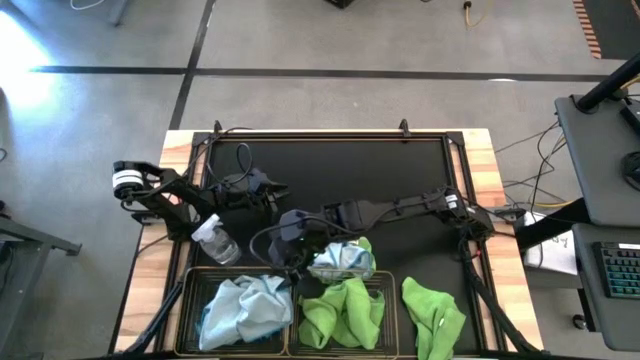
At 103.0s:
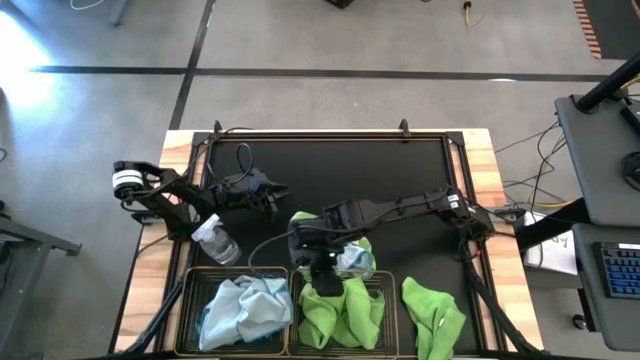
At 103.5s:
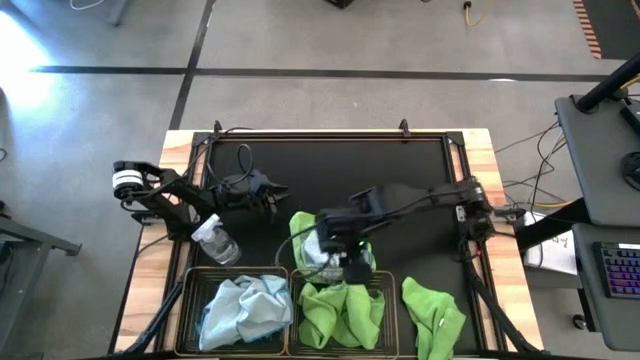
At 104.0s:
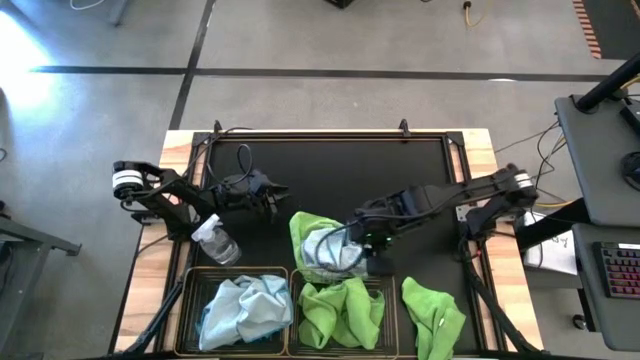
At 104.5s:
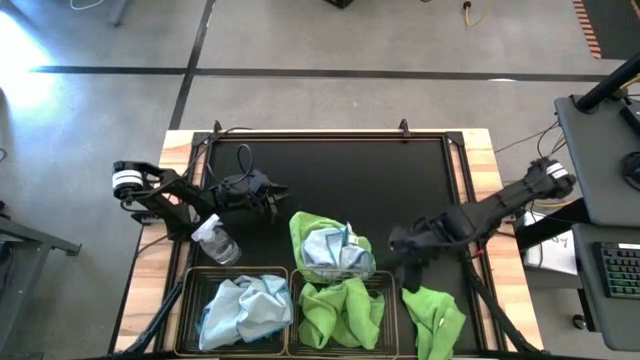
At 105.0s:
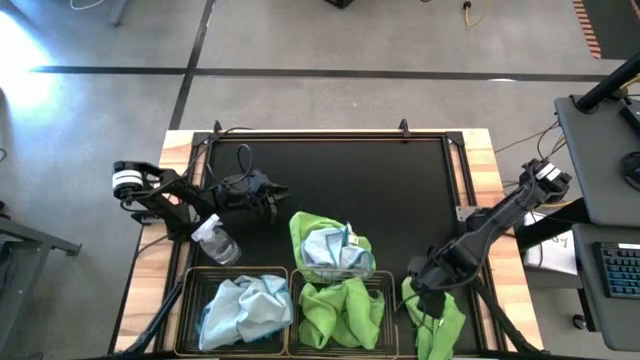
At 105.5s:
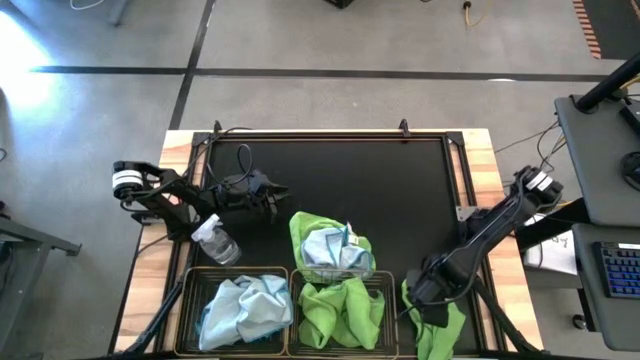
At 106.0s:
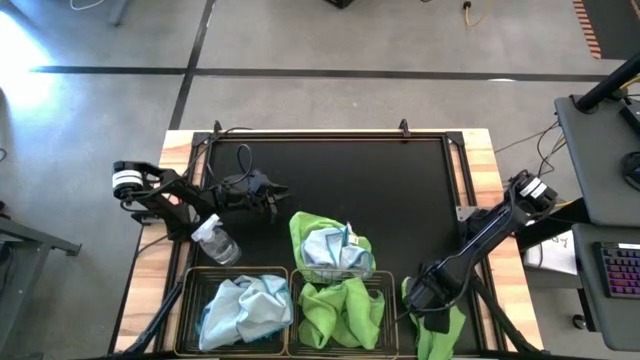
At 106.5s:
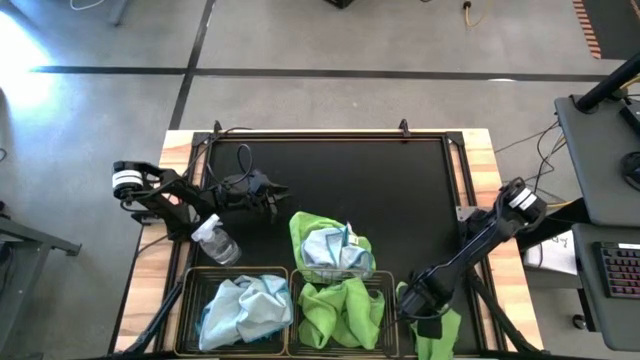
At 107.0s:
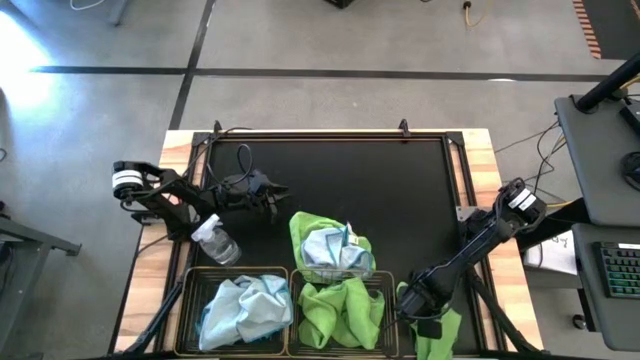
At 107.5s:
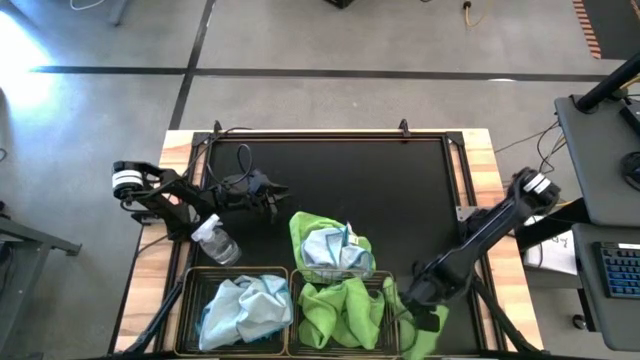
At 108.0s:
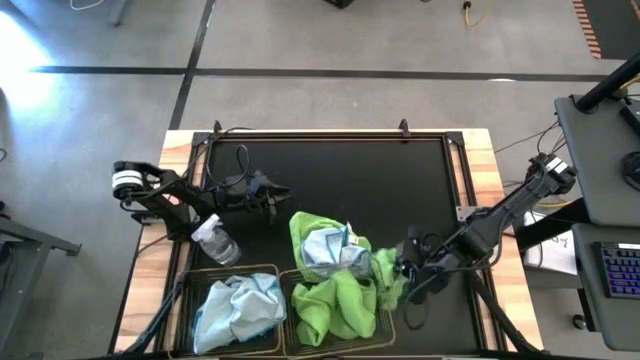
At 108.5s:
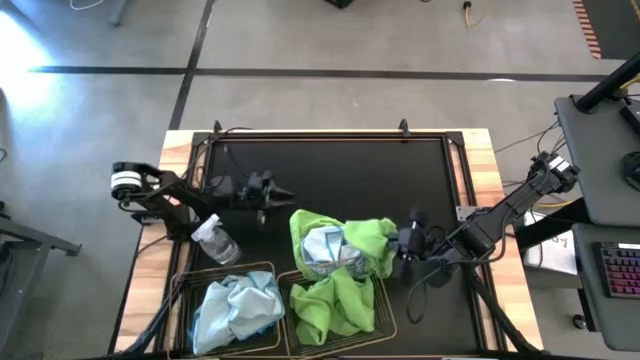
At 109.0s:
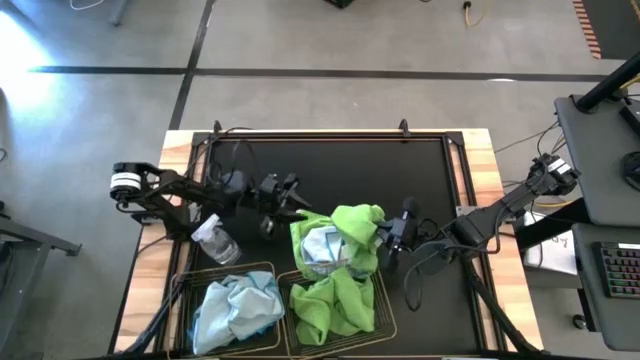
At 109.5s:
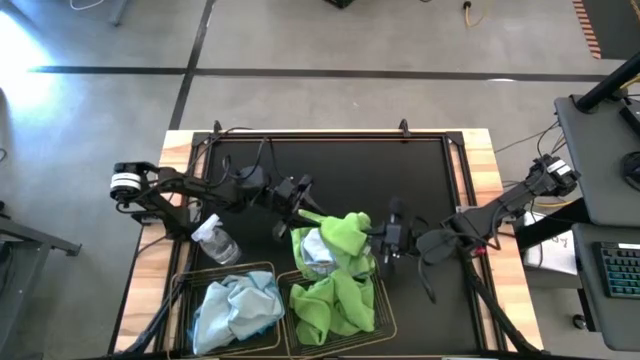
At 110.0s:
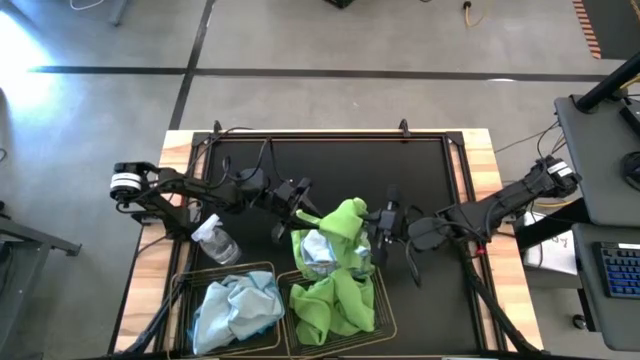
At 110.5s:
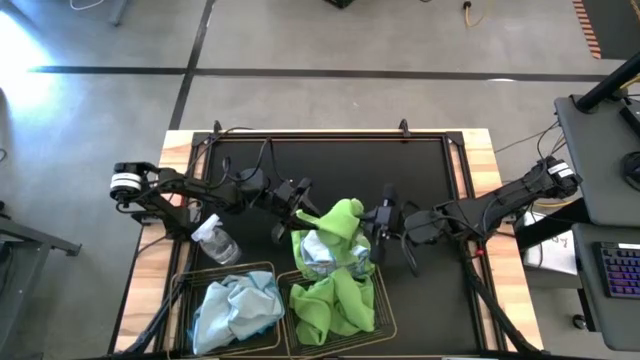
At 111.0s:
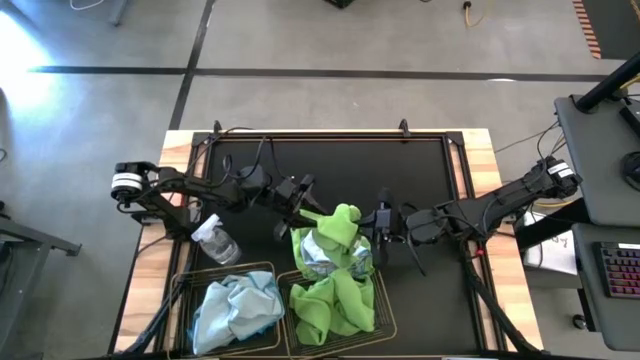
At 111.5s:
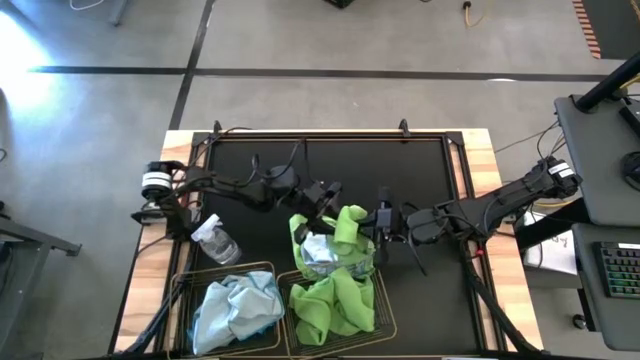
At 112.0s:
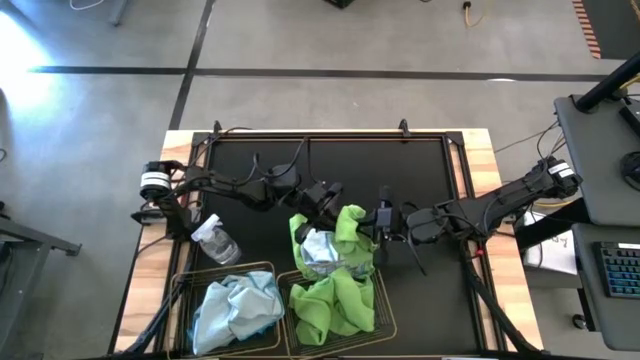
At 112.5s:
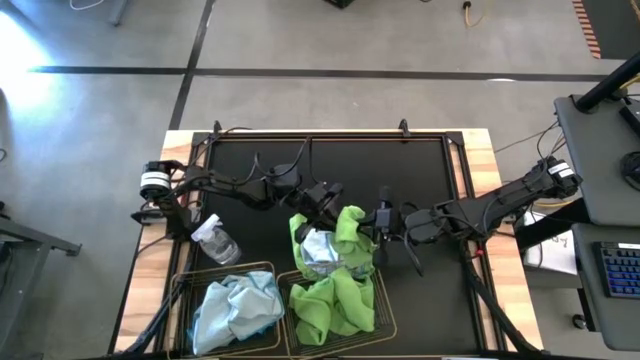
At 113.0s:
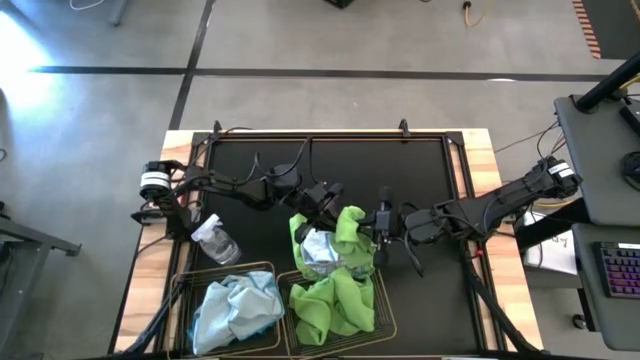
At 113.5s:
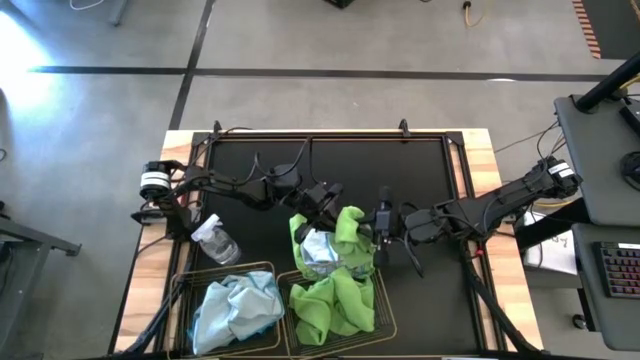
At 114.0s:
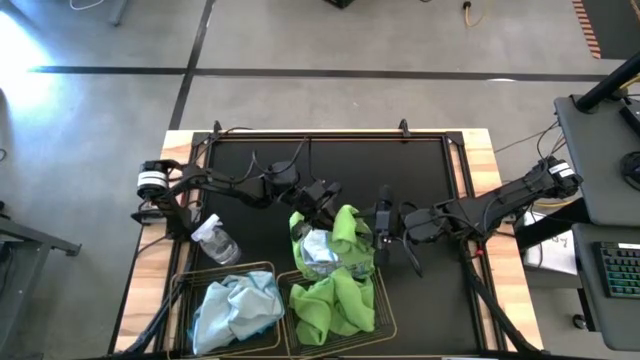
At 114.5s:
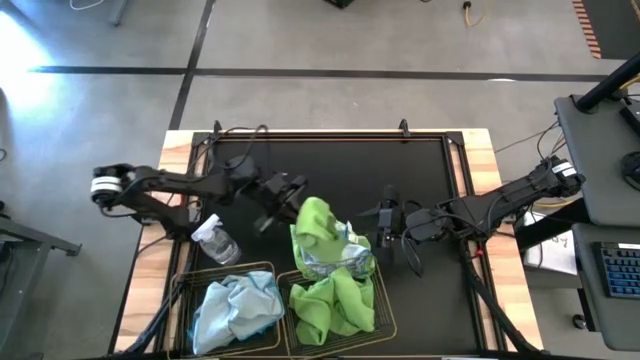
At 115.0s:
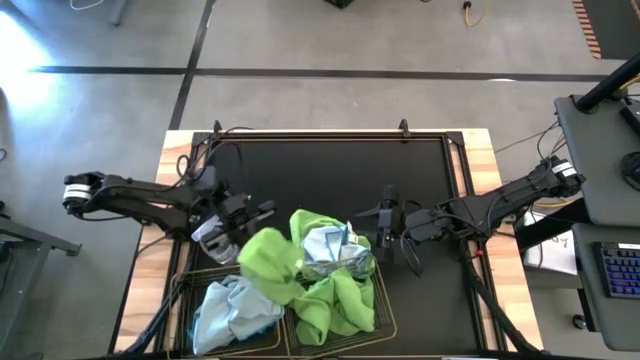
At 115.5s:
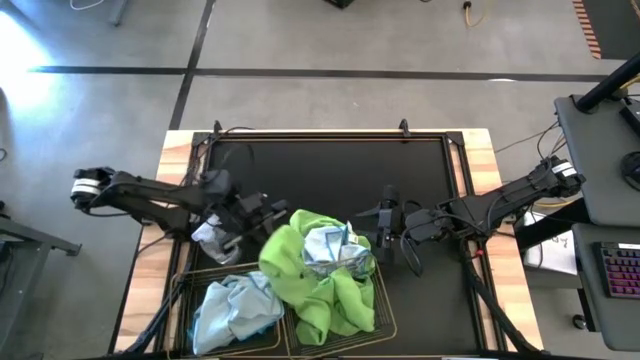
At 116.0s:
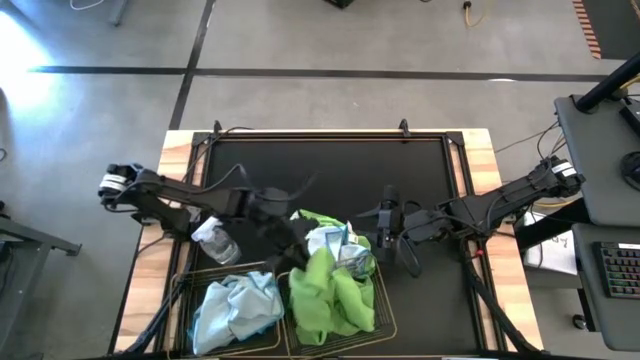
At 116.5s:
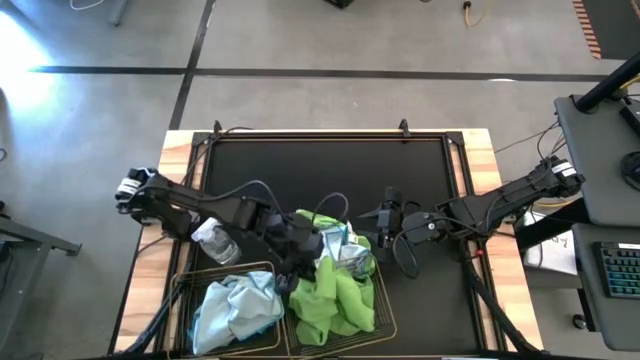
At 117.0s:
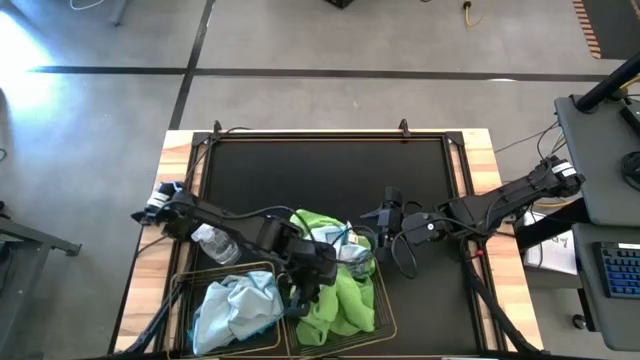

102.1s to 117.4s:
Task: Sort microfiber towel by color & place in baskets
Put the right green towel into the right wire basket

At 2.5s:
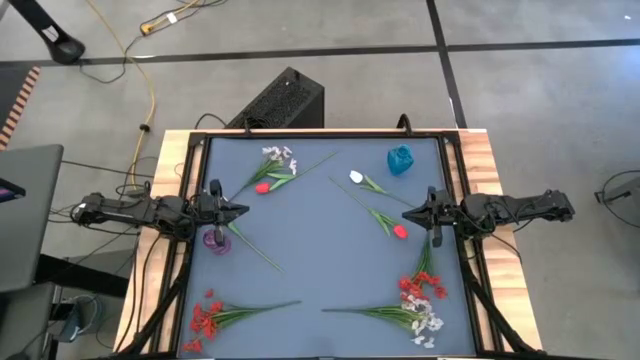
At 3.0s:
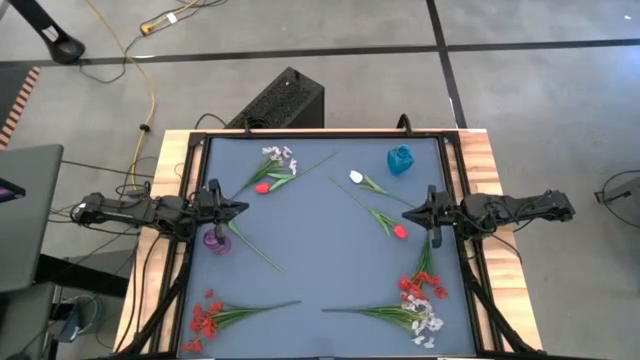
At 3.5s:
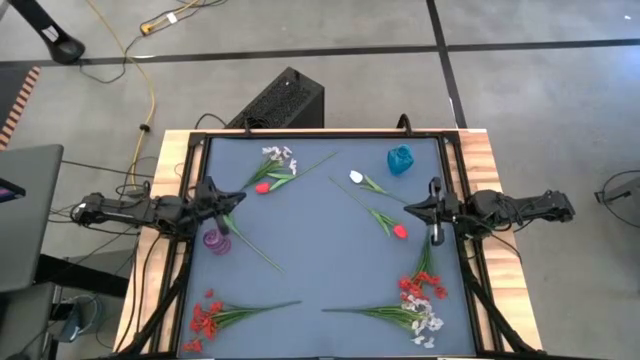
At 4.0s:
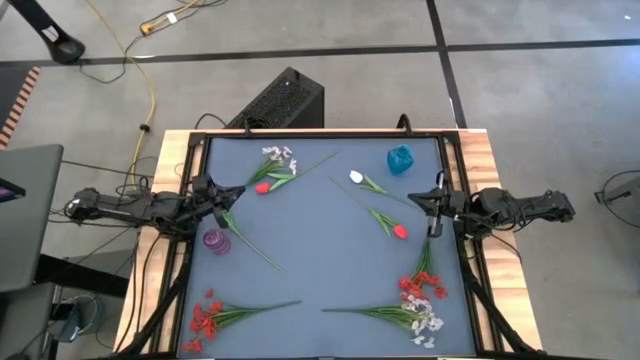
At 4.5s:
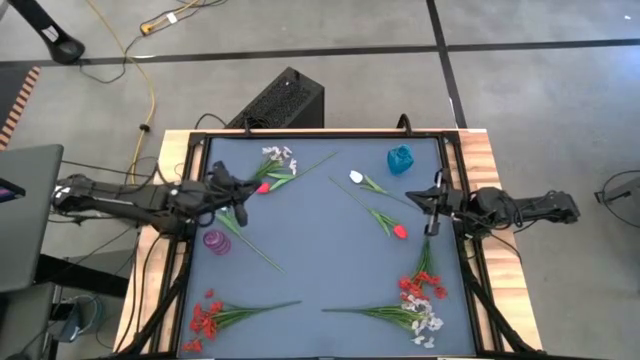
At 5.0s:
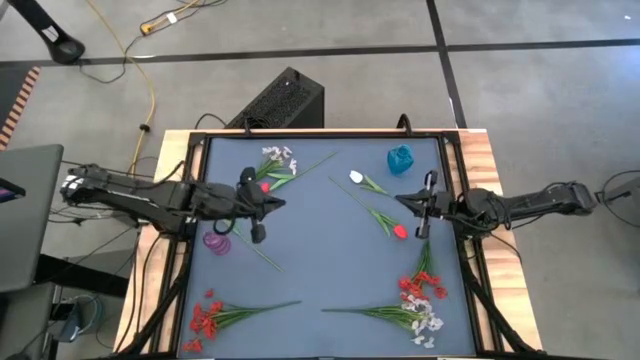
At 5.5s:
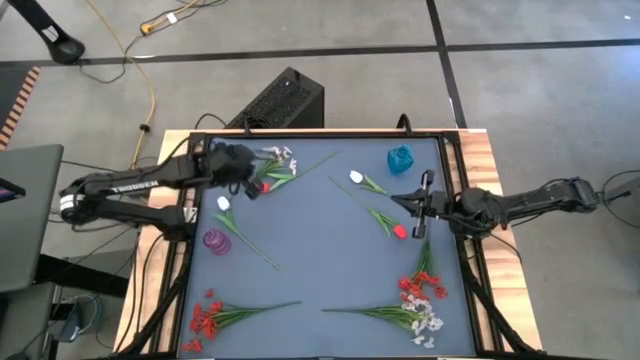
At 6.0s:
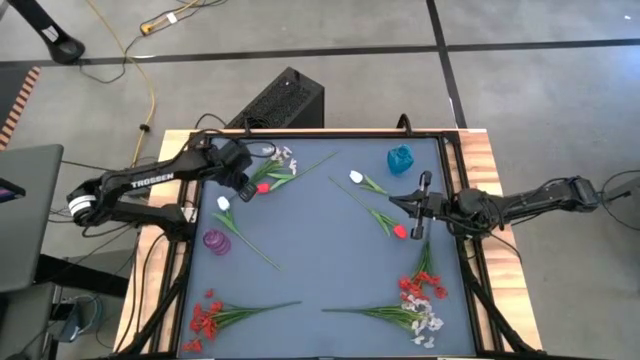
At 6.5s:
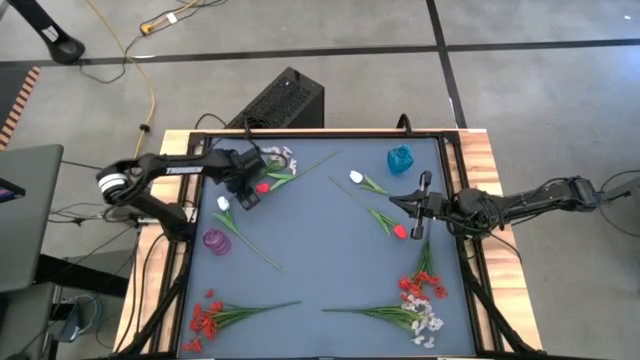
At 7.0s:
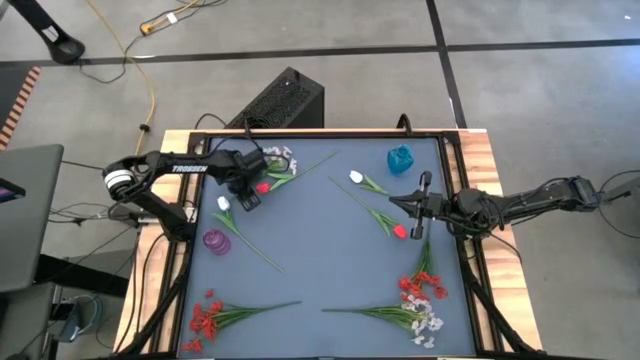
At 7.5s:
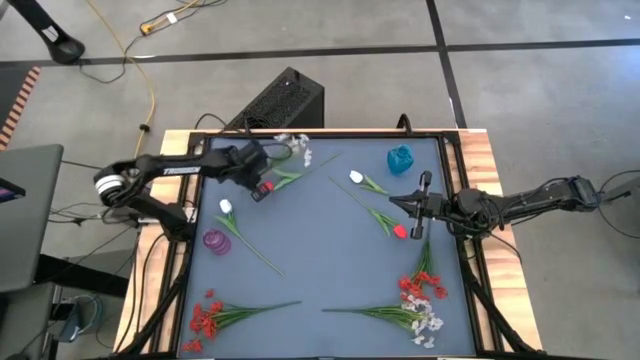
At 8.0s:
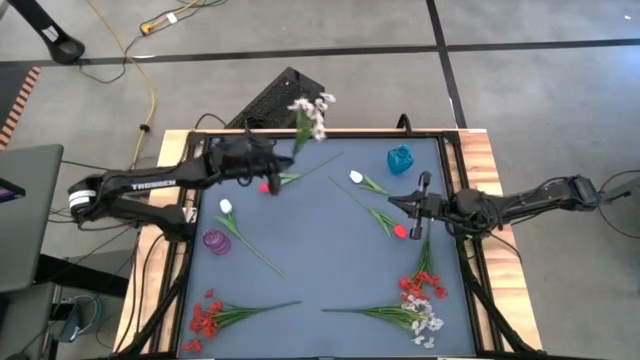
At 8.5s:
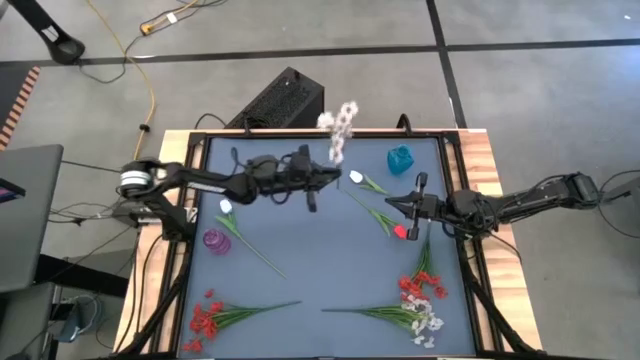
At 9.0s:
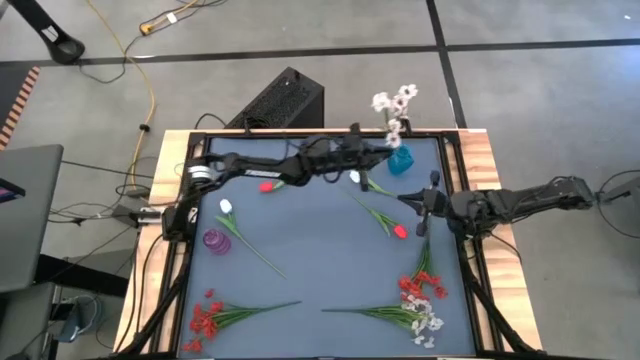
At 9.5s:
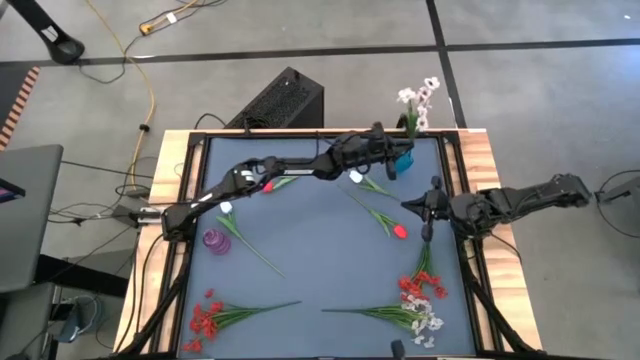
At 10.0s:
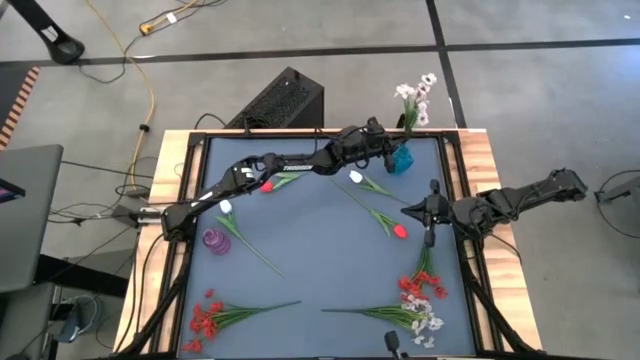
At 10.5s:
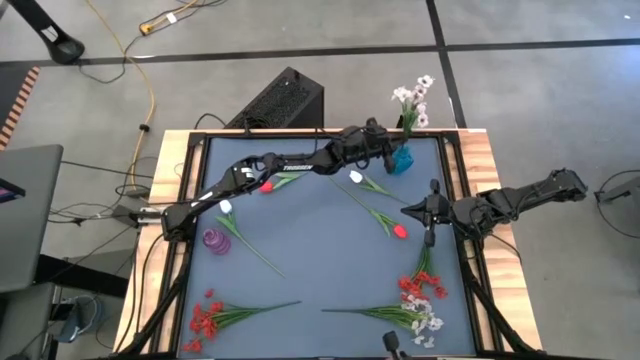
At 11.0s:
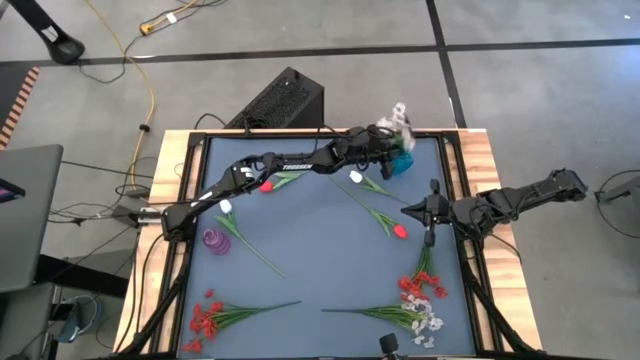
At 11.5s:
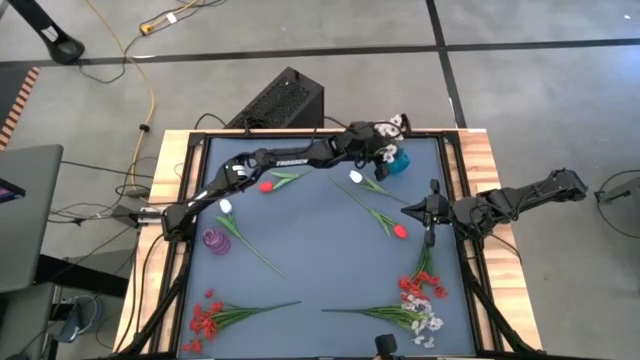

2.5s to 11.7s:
Task: Sort flowers into vase by color
Put the top white flower into the blue vase
